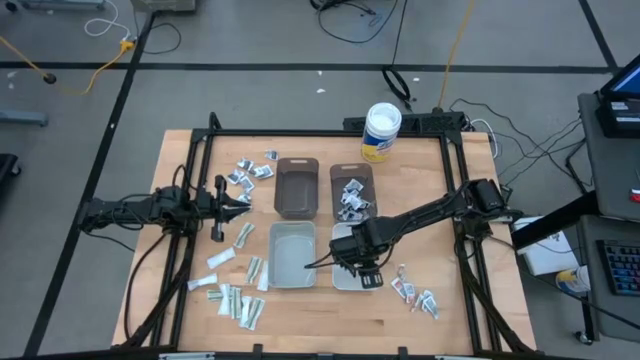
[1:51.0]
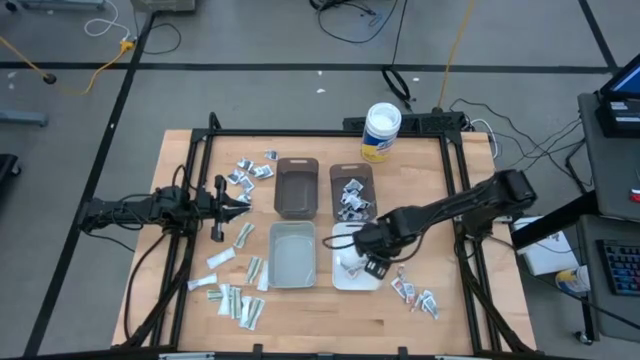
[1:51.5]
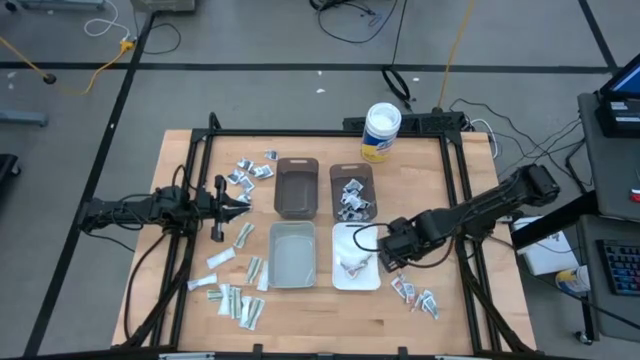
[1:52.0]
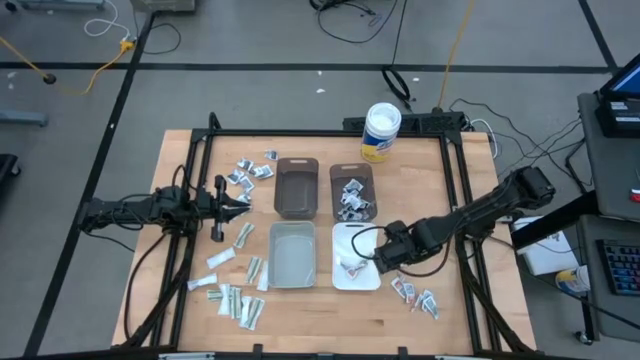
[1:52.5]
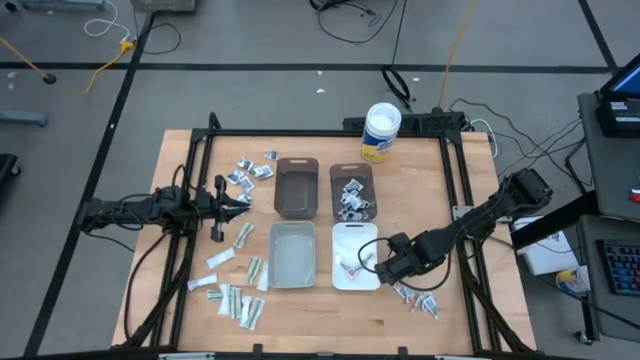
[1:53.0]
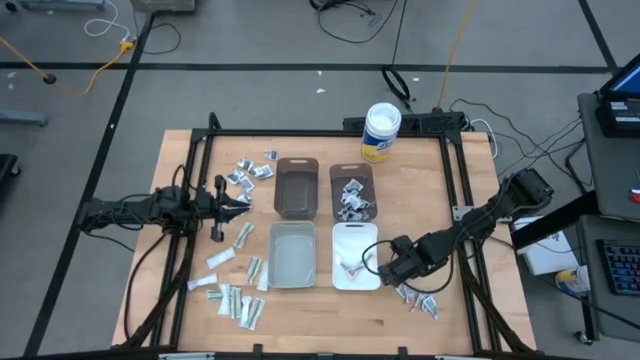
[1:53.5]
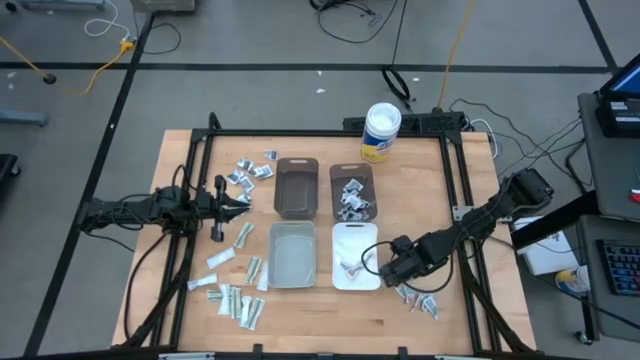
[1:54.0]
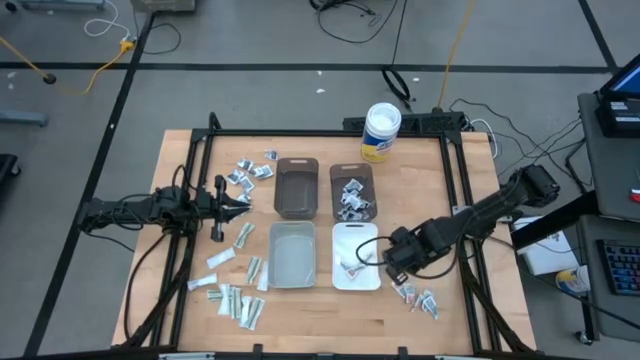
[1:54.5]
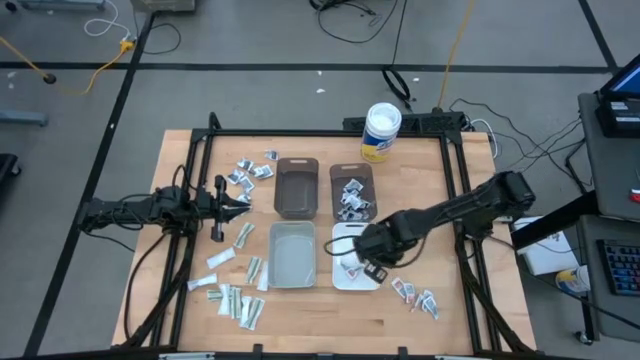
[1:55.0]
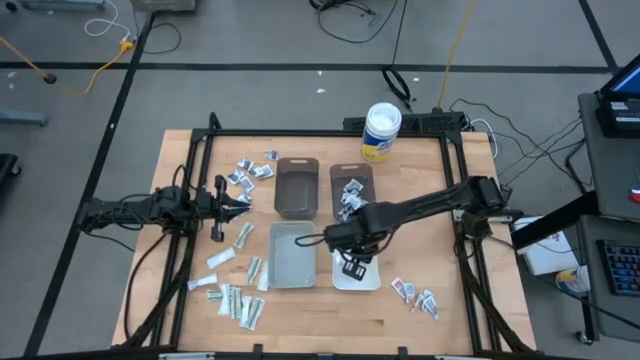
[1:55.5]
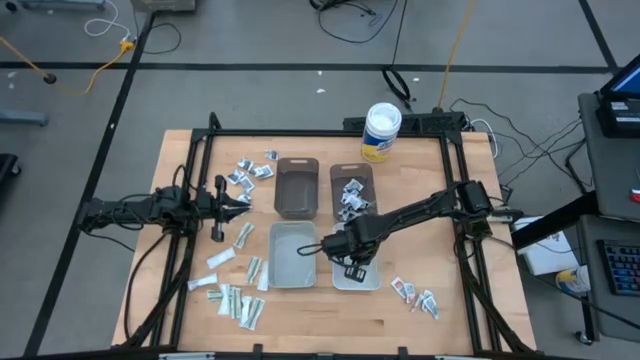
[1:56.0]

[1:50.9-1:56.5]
Task: Pick & Place First Aid Supplies
Put the orange pad into the white bin

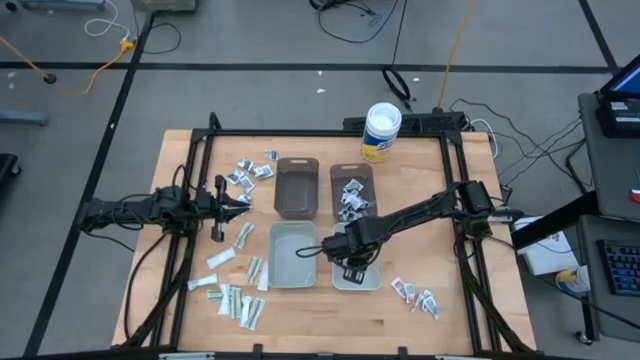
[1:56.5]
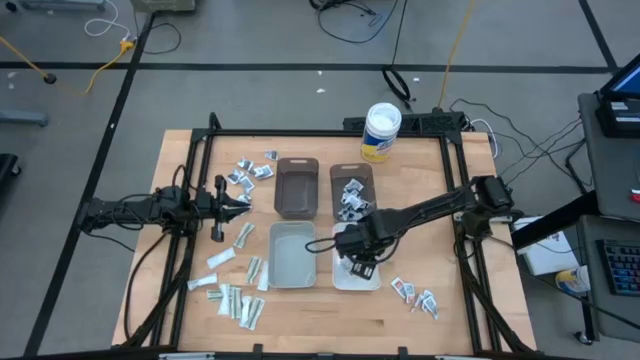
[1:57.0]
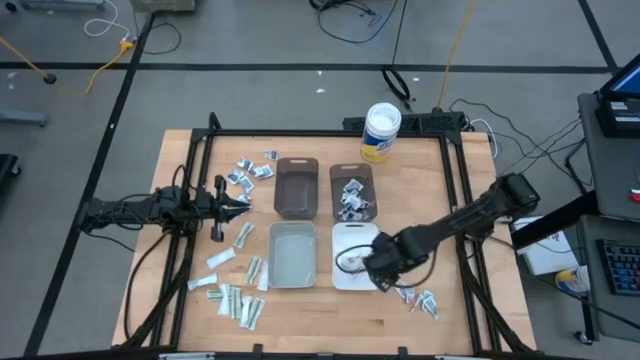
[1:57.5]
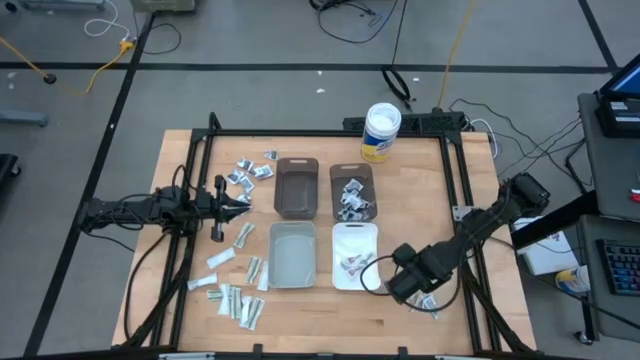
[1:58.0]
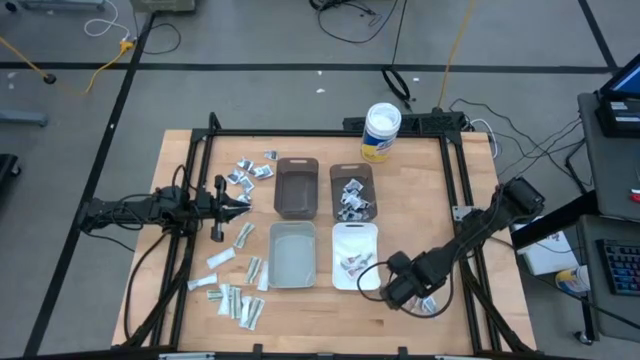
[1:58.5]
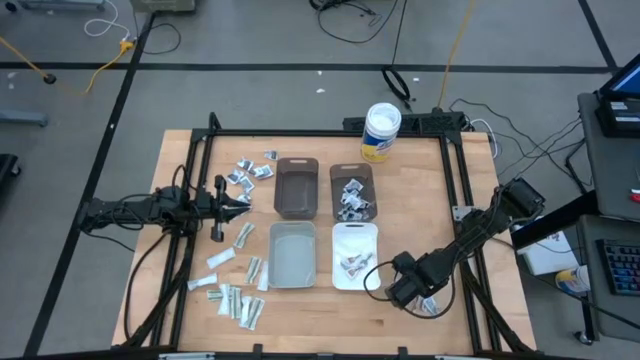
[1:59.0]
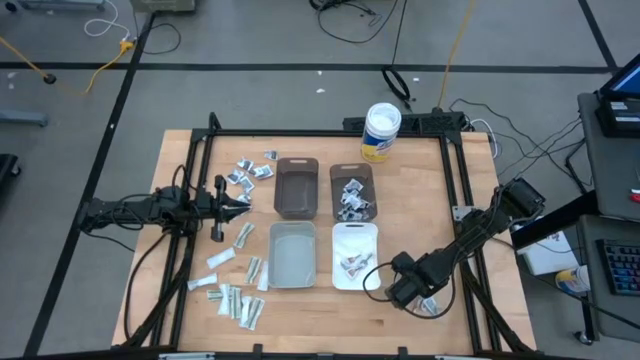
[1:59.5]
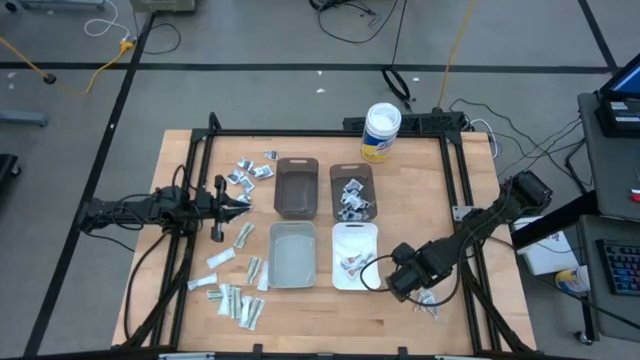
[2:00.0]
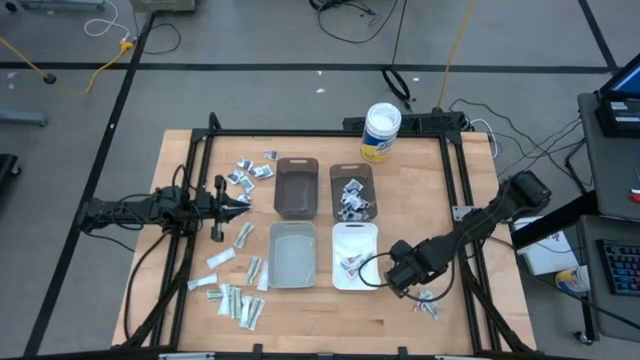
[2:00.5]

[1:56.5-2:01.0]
Put the orange pad into the white bin

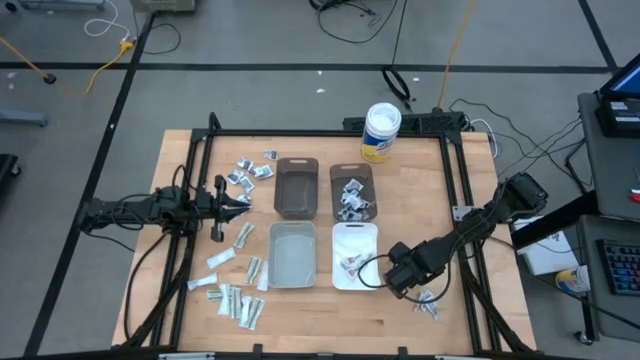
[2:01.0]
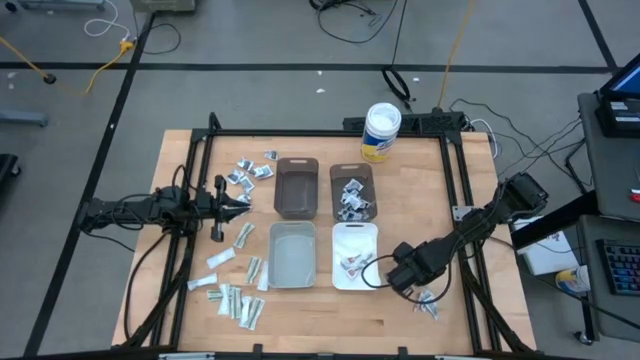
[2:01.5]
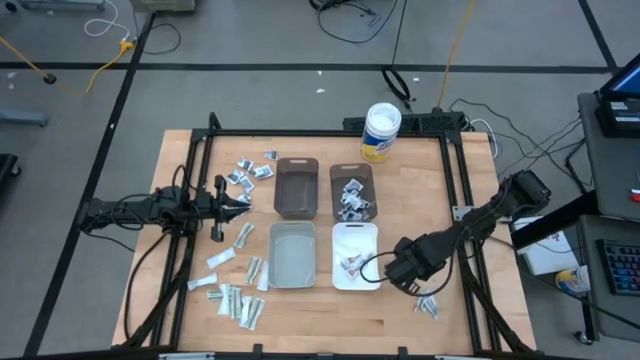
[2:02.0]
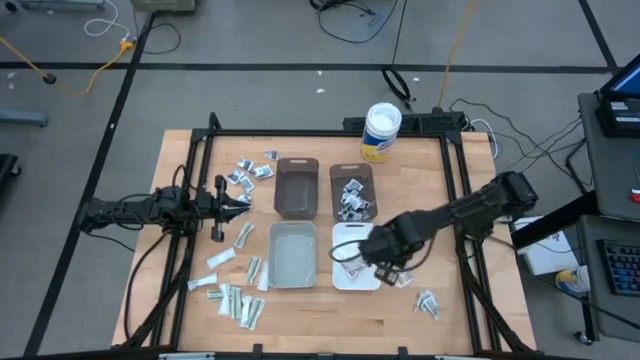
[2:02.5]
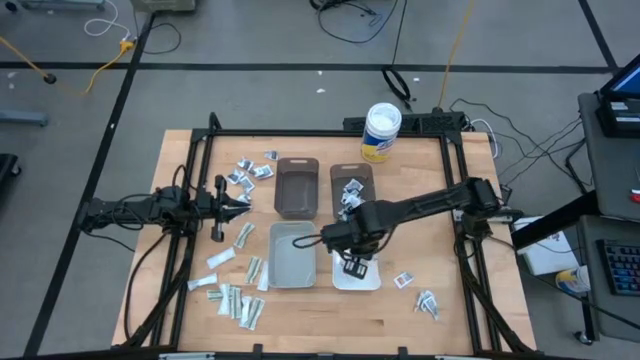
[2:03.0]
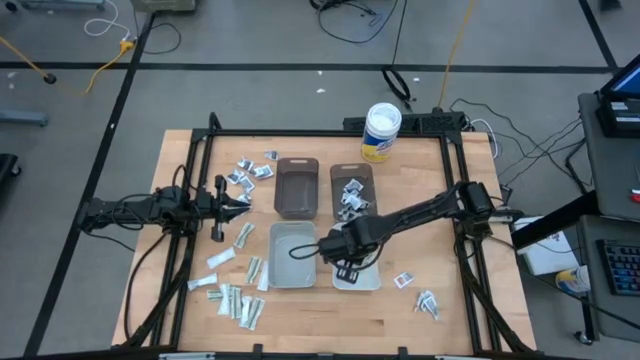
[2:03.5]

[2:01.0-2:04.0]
Put the orange pad into the white bin

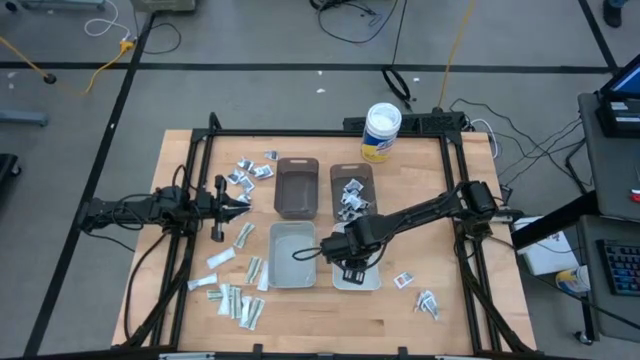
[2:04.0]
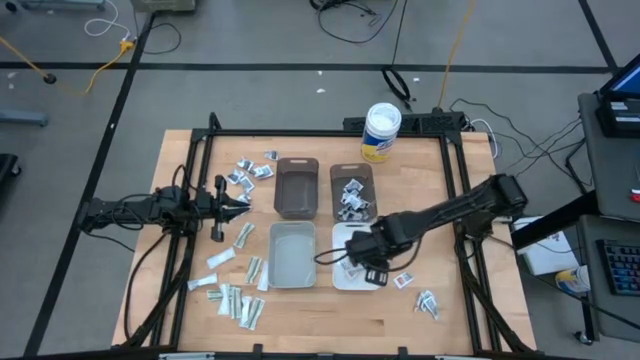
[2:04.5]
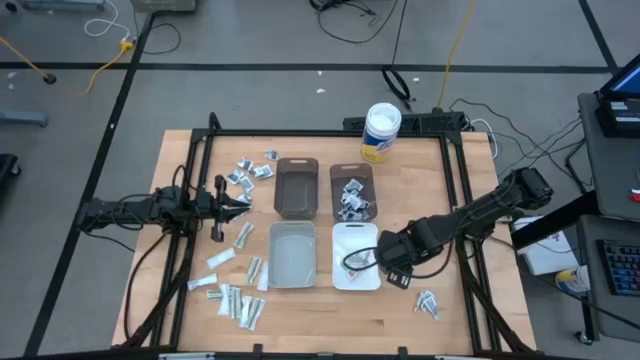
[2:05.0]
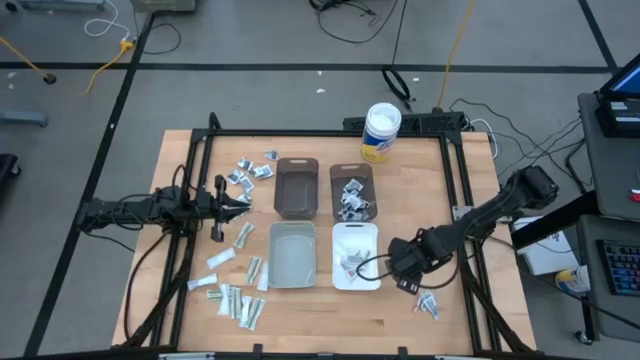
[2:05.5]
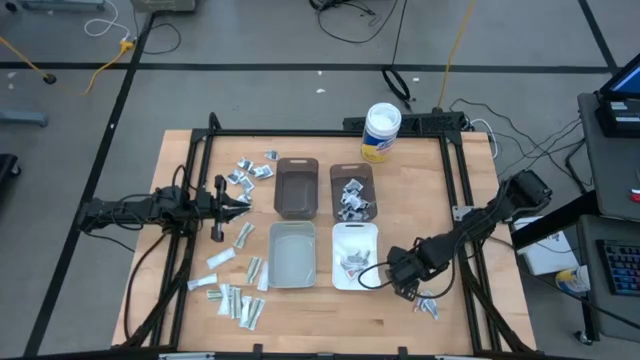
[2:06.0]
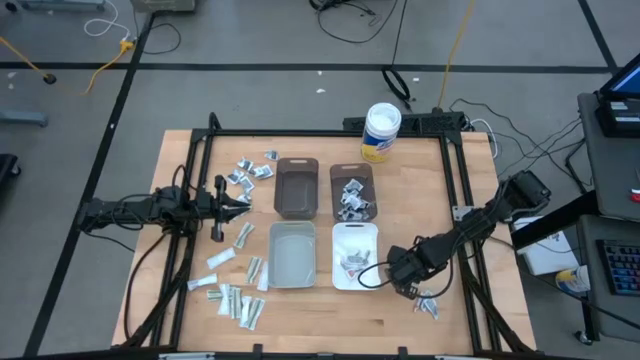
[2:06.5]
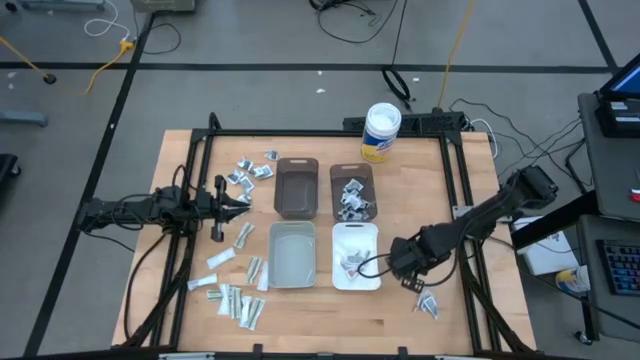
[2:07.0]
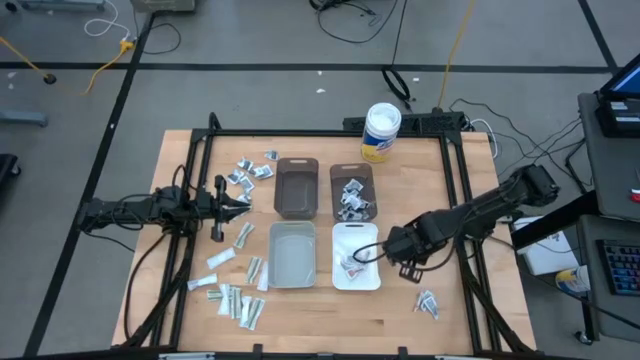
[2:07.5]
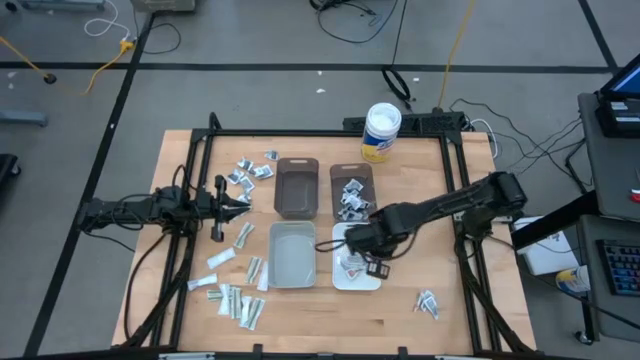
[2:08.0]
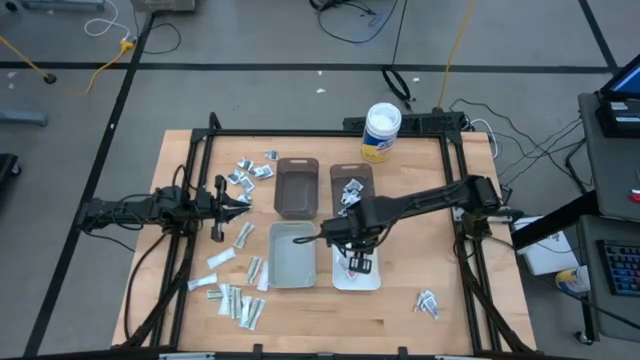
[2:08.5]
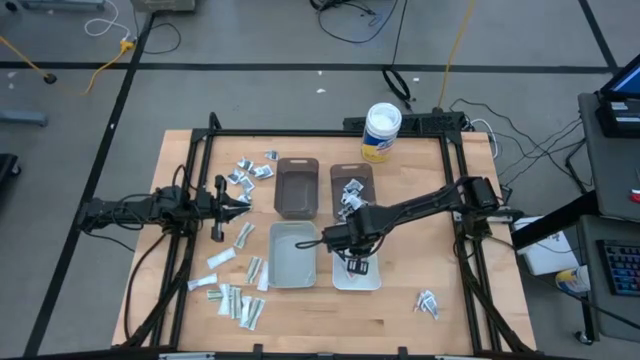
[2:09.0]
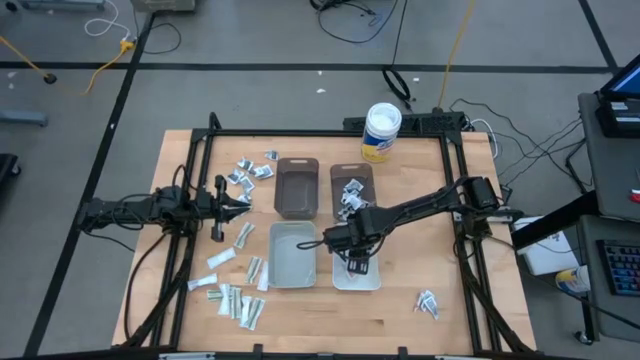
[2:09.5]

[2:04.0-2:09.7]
Put the orange pad into the white bin

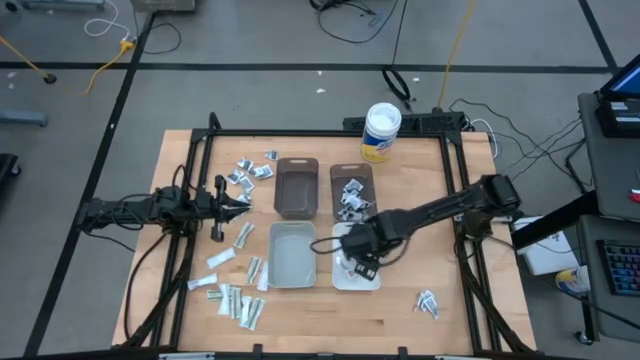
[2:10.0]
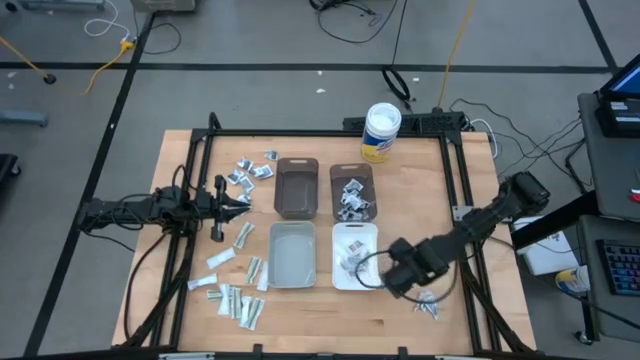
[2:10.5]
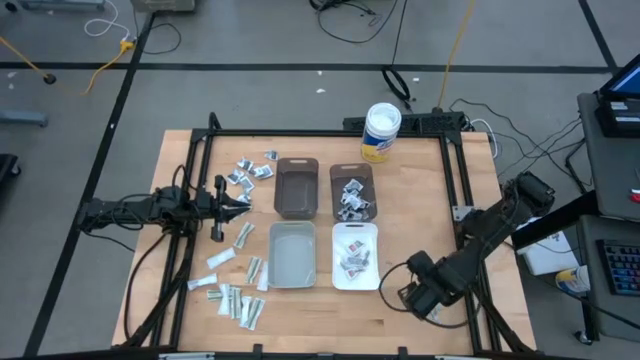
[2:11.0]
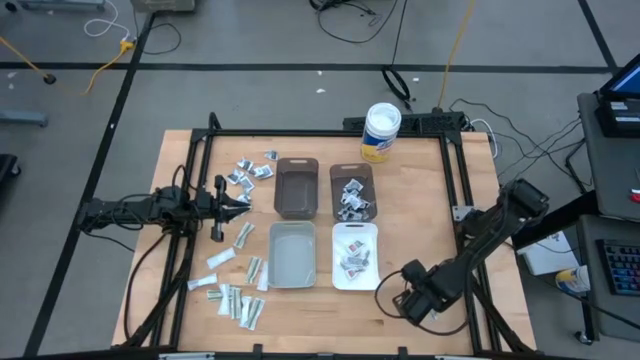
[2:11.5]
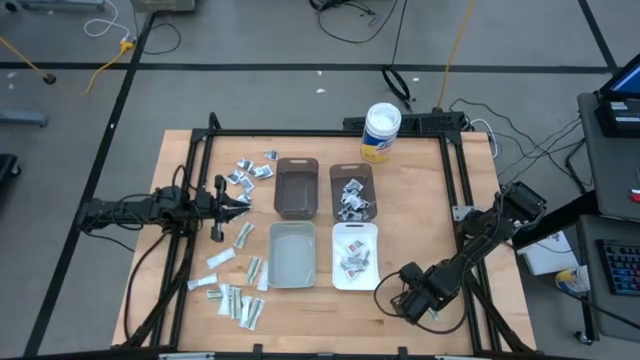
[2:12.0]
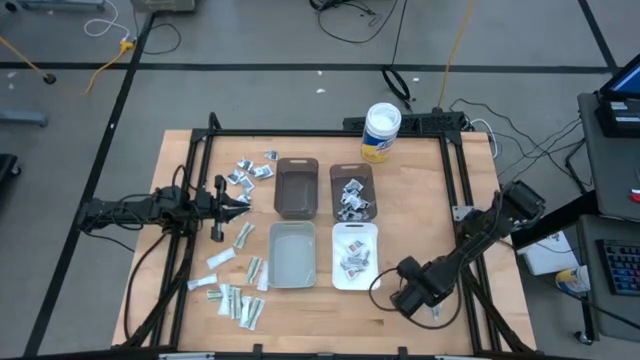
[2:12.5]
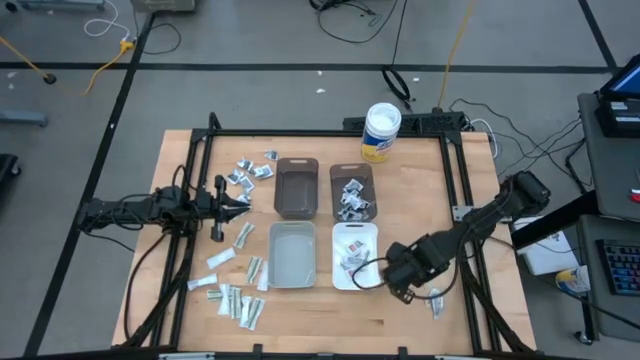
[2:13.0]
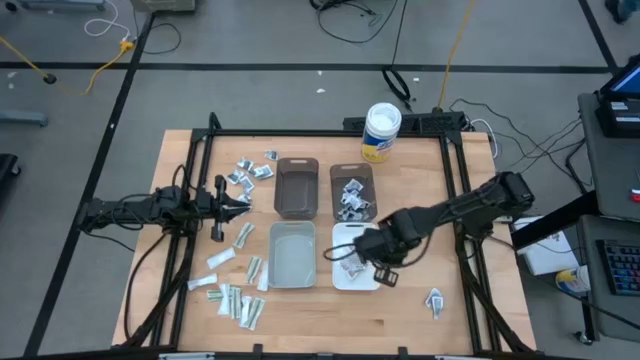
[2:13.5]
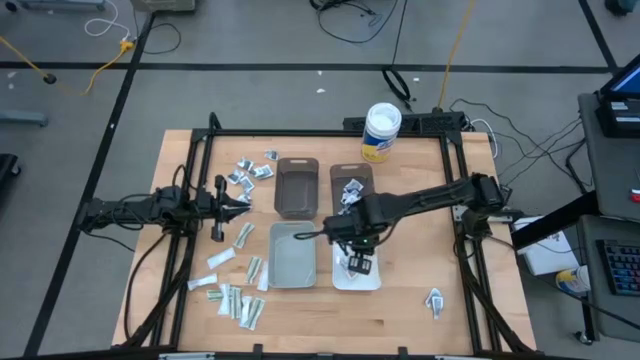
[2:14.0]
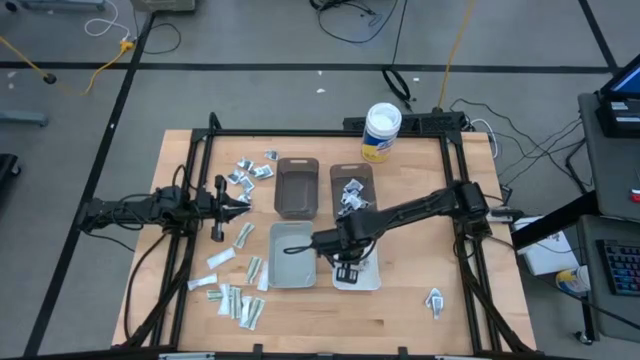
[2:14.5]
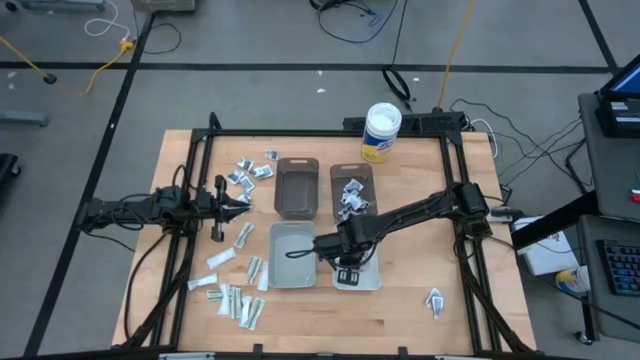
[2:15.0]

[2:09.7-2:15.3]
Put the orange pad into the white bin
